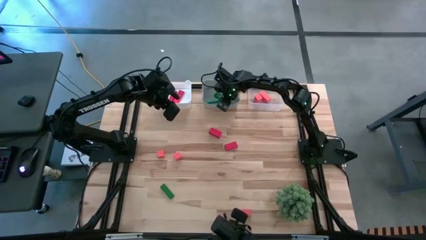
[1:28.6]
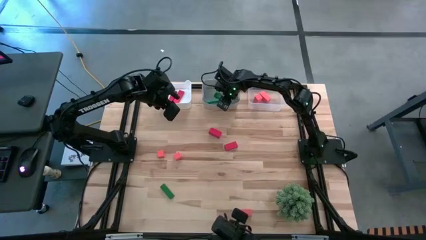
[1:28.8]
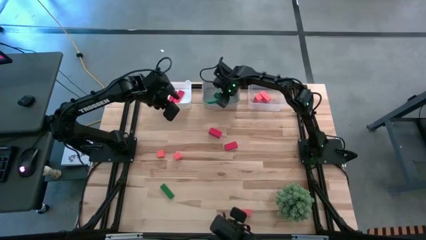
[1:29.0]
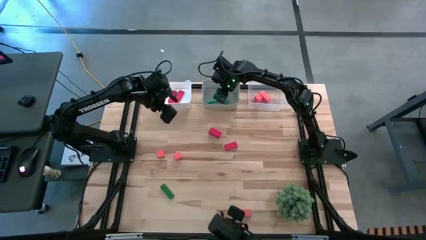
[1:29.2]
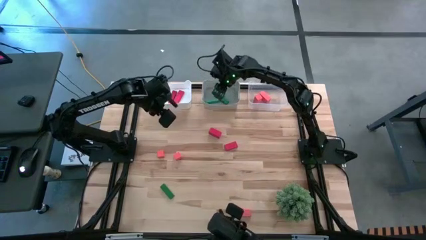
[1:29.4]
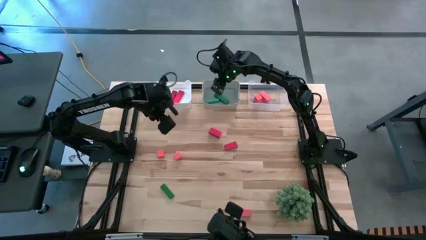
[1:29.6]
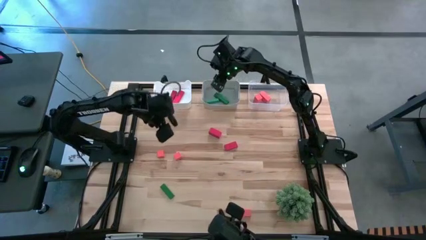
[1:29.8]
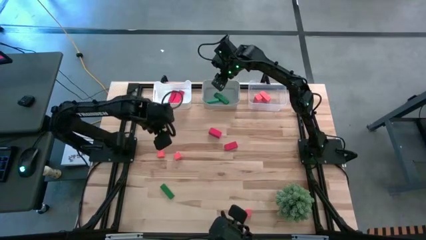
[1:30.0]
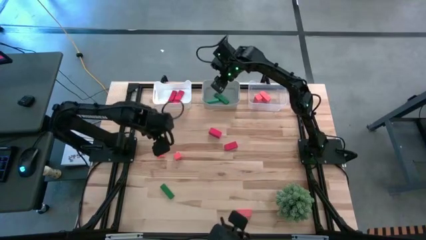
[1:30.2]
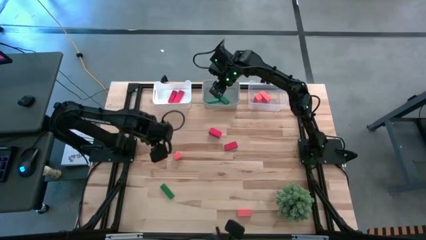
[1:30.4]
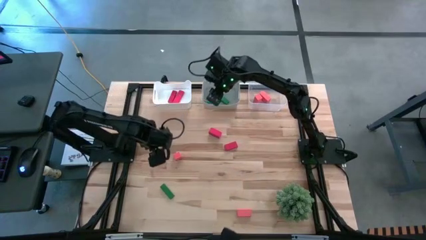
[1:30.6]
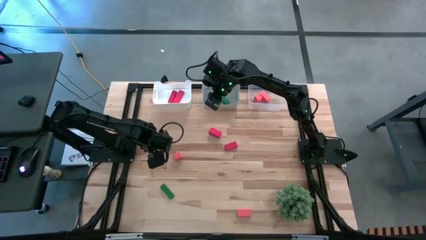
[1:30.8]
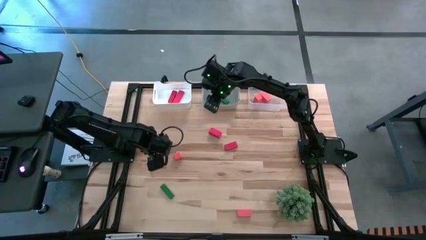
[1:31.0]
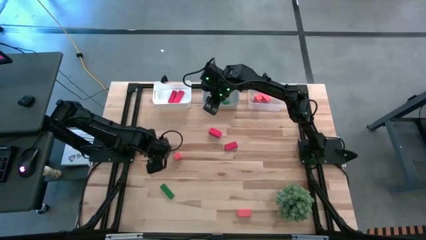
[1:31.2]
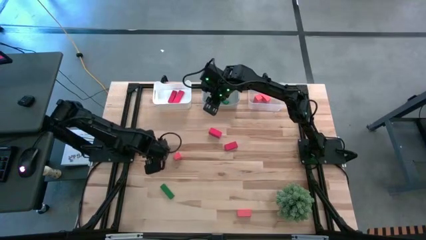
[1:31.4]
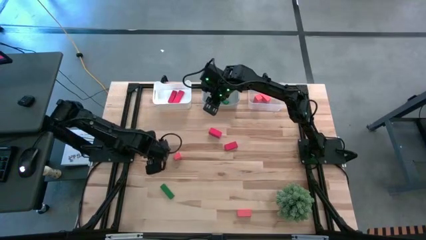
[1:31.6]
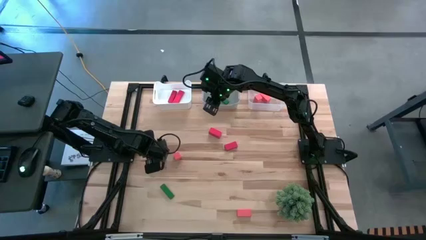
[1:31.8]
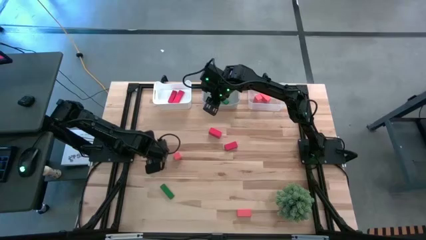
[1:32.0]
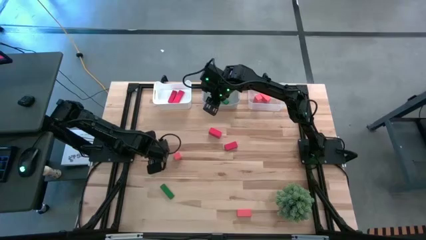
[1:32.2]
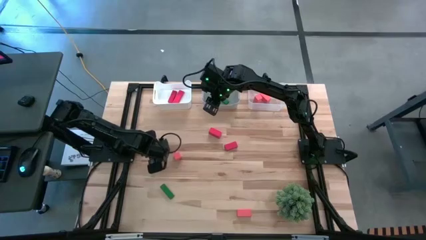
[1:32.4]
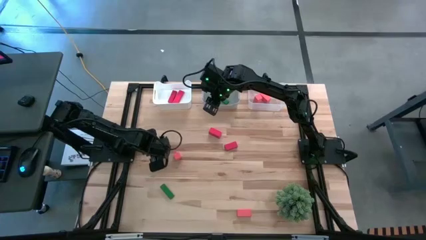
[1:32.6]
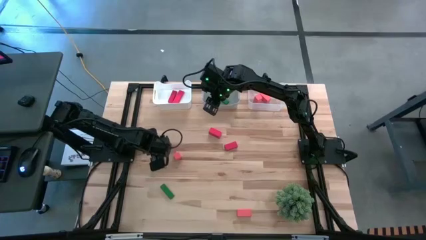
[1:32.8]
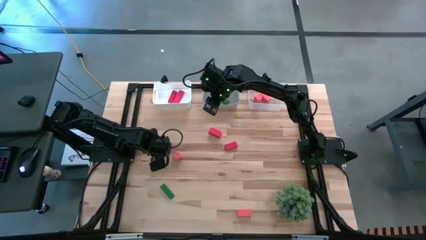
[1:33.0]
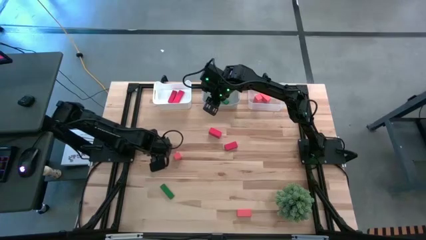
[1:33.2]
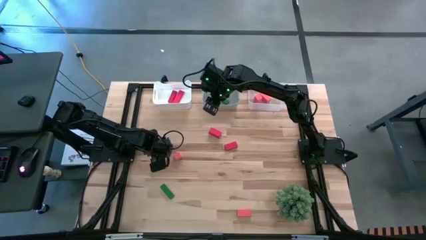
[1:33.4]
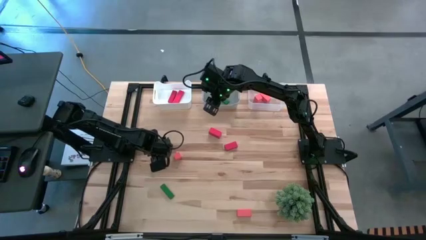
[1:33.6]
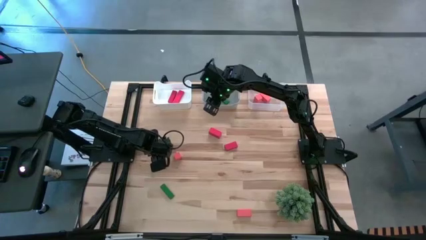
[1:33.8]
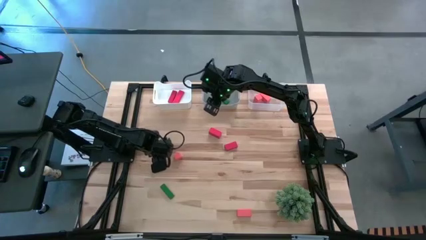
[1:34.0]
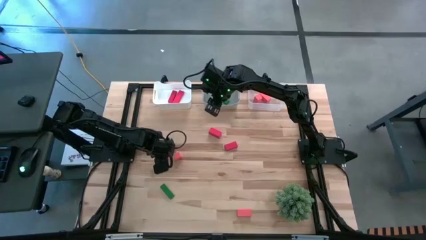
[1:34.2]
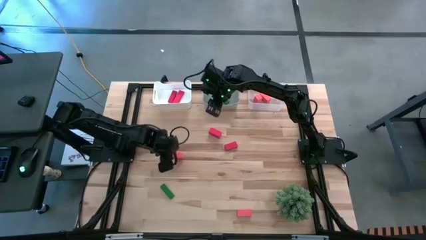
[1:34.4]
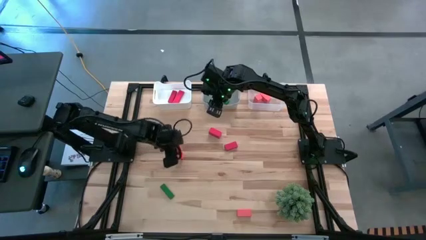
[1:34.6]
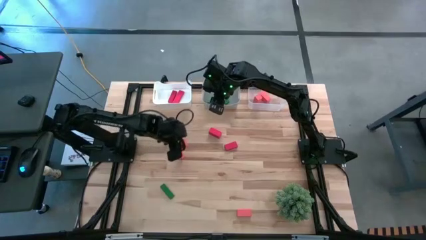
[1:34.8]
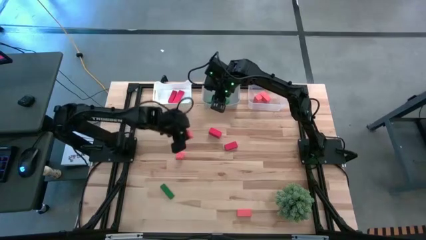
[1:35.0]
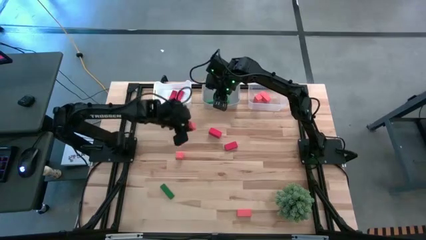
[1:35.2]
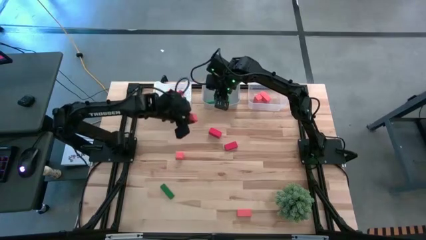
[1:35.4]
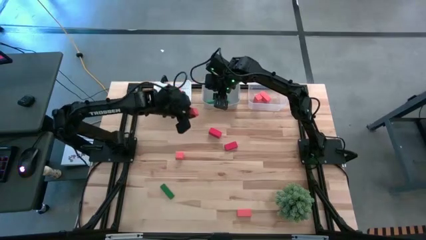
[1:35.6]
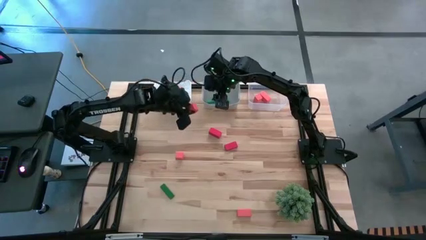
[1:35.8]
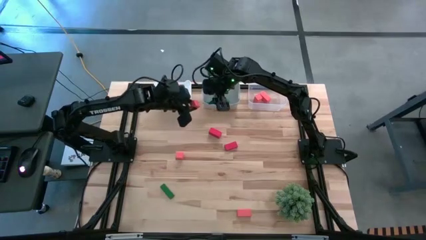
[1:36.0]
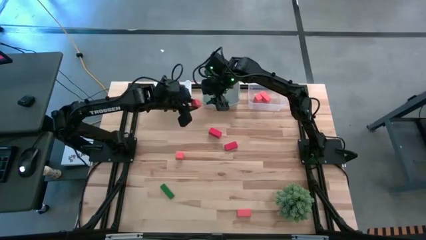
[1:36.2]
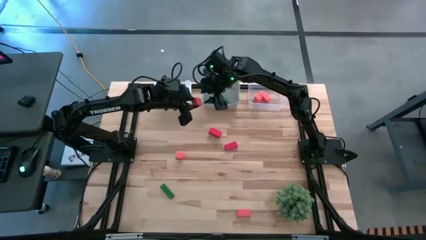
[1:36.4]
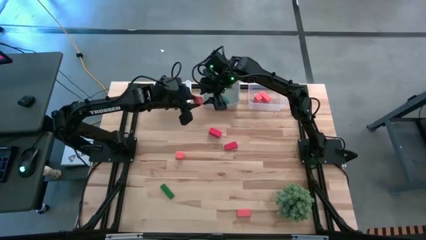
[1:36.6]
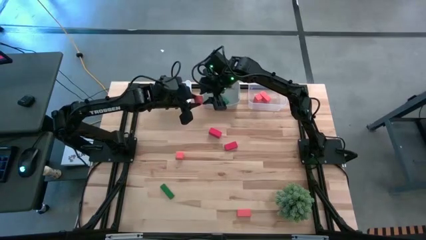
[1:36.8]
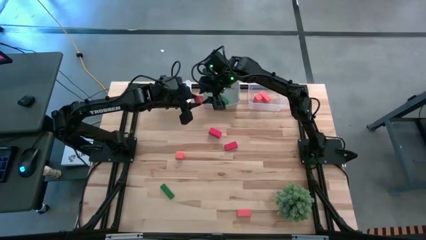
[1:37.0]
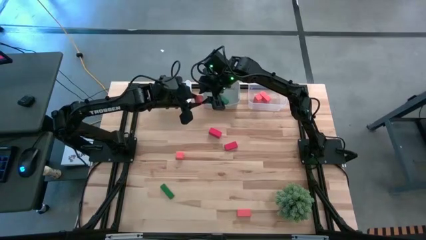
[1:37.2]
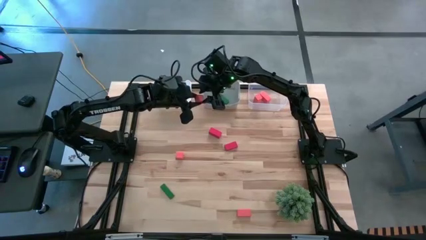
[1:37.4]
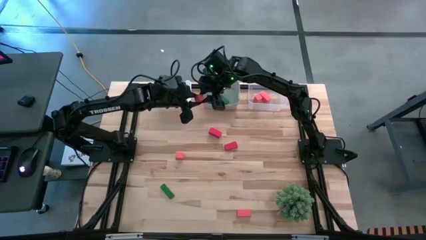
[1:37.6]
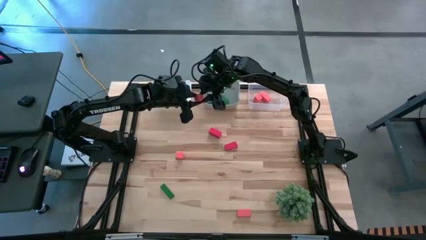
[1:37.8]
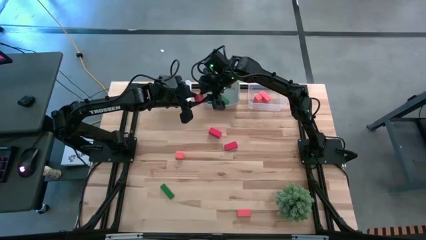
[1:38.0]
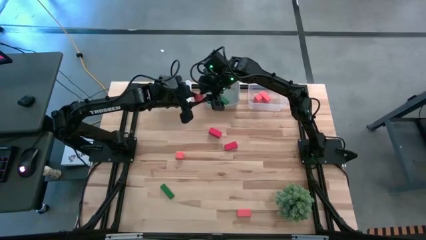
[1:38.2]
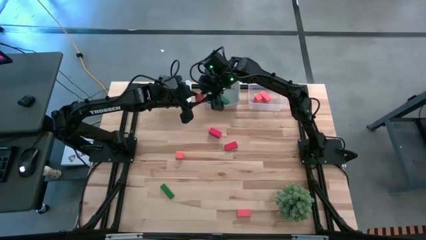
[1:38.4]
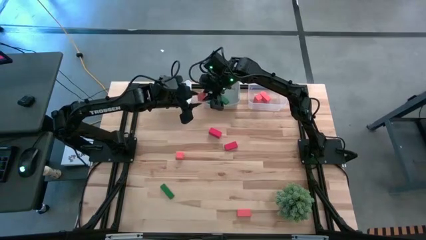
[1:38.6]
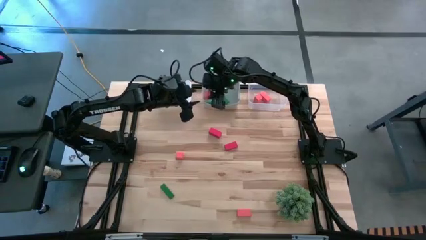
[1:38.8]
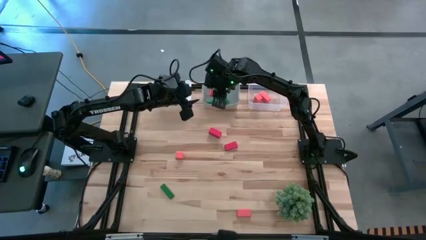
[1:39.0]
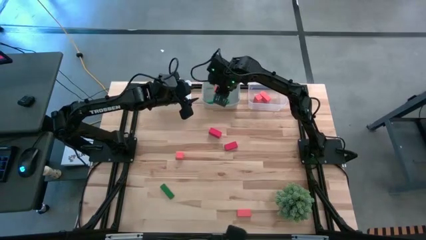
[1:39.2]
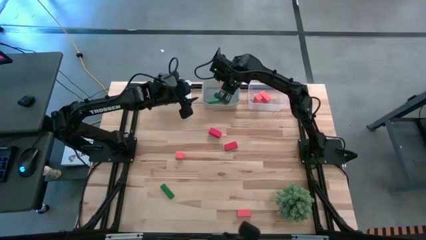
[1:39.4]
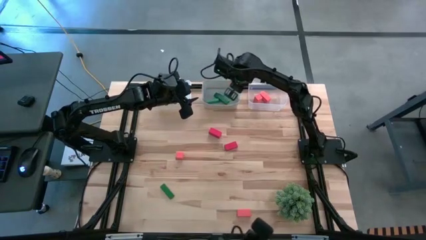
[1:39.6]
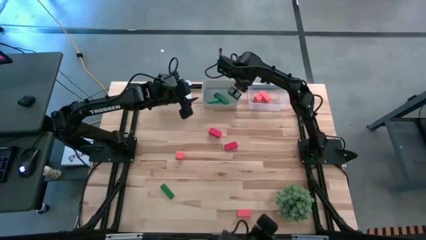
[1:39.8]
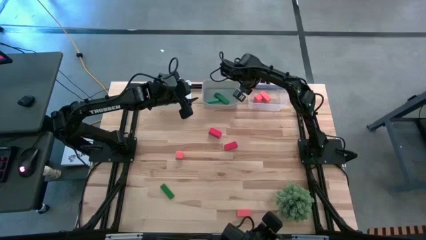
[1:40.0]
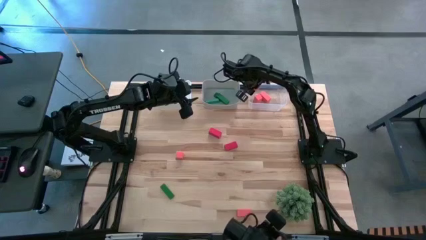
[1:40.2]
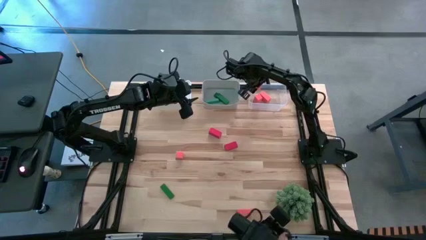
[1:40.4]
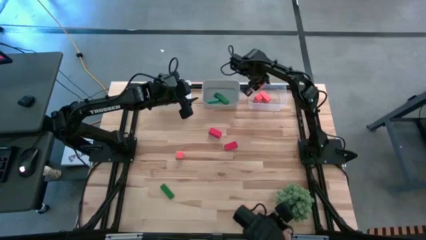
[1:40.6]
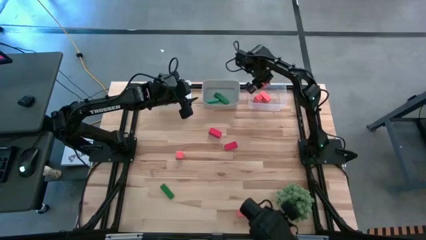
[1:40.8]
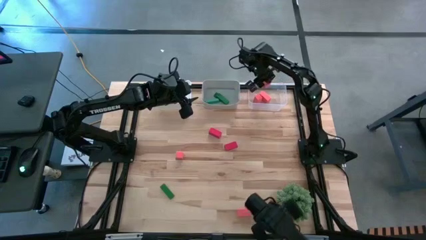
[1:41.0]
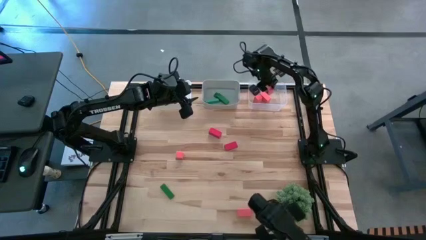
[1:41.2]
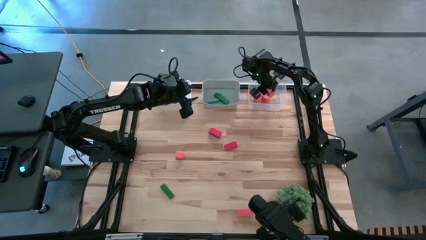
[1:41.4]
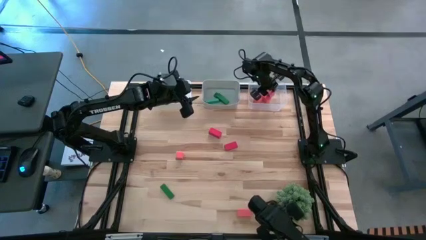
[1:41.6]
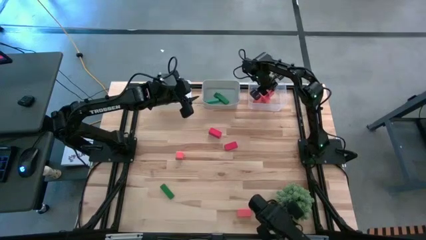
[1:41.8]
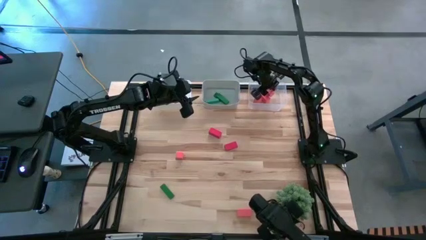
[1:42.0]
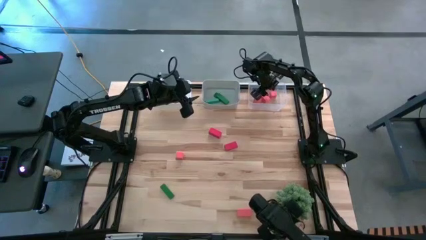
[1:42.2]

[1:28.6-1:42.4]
Task: Sort & place blocks by color
Put the top left orange block into the transparent bin
